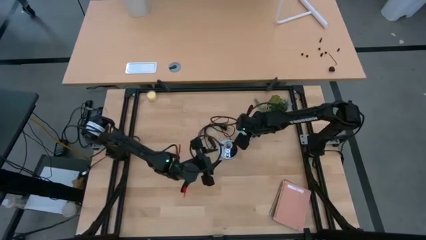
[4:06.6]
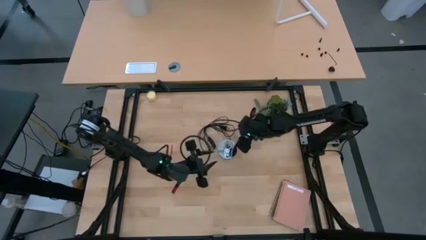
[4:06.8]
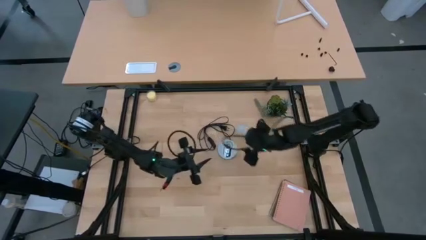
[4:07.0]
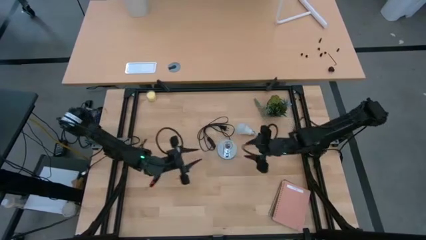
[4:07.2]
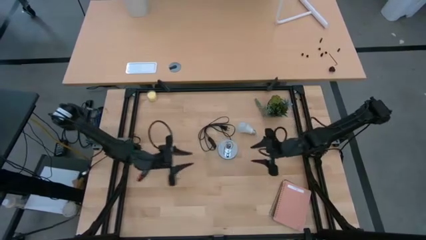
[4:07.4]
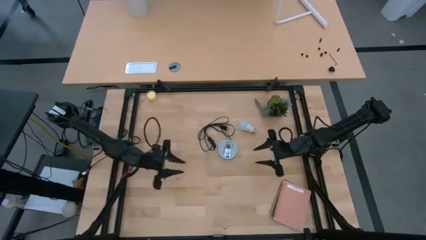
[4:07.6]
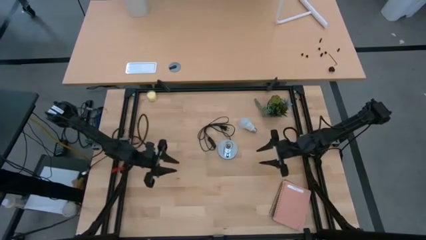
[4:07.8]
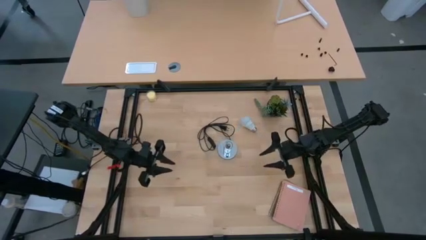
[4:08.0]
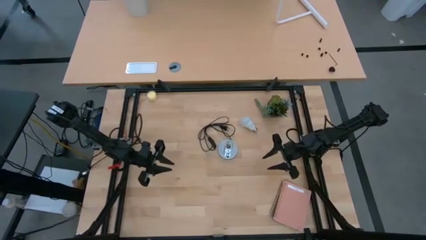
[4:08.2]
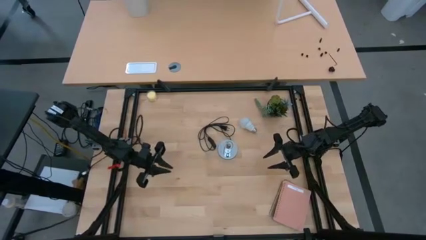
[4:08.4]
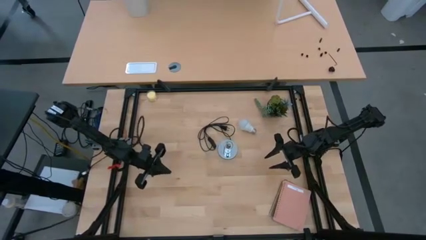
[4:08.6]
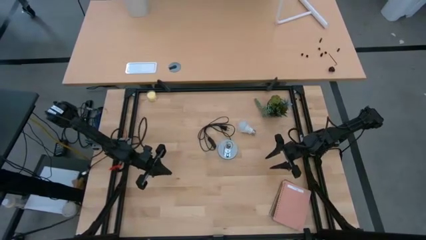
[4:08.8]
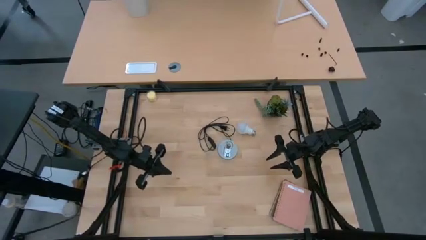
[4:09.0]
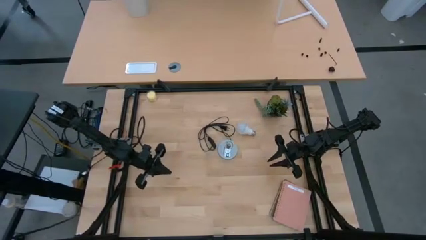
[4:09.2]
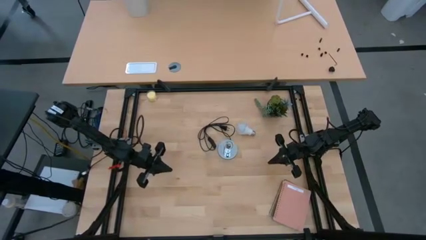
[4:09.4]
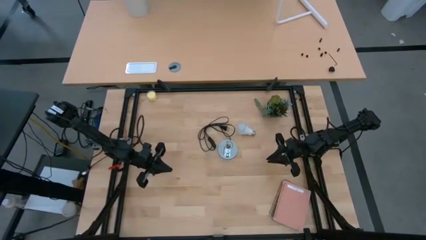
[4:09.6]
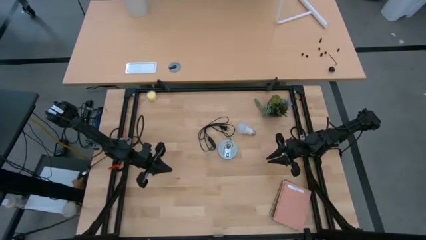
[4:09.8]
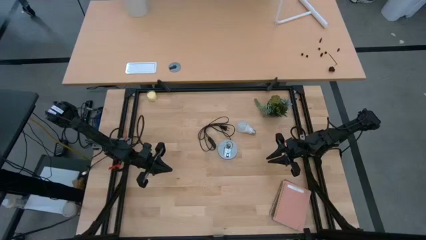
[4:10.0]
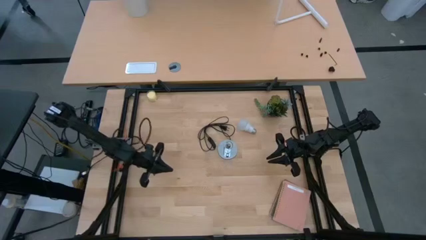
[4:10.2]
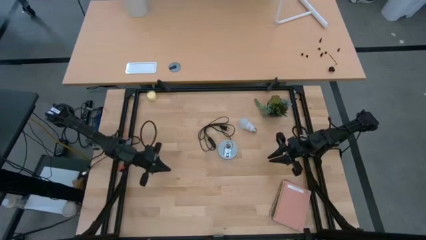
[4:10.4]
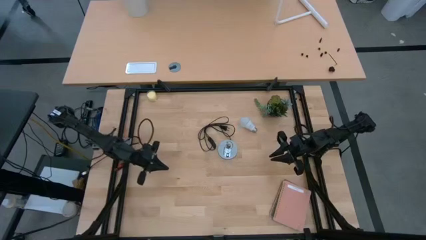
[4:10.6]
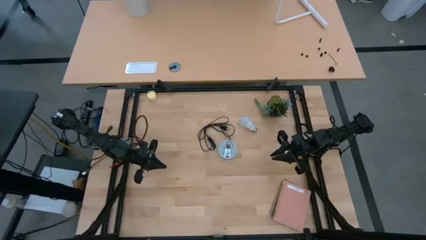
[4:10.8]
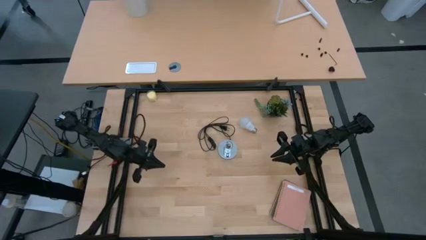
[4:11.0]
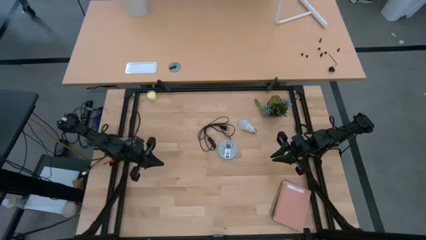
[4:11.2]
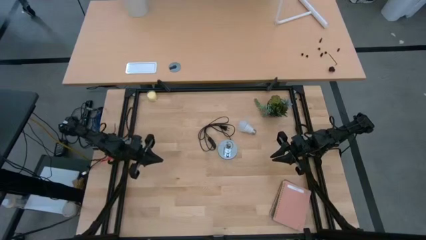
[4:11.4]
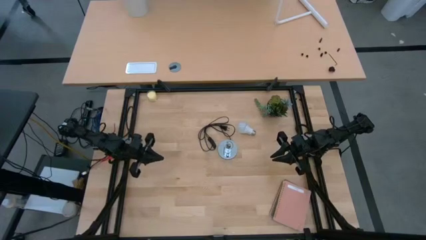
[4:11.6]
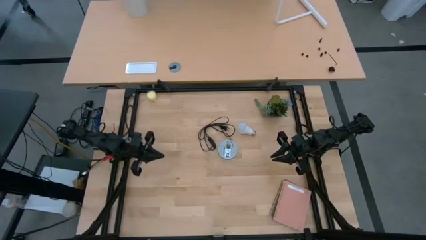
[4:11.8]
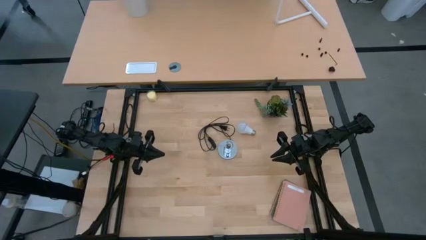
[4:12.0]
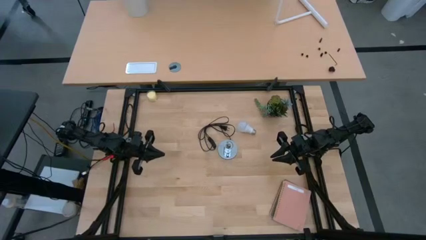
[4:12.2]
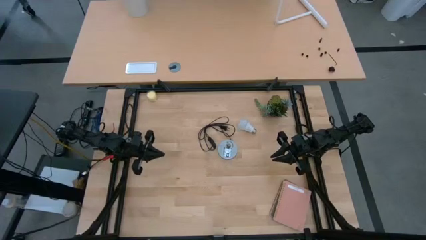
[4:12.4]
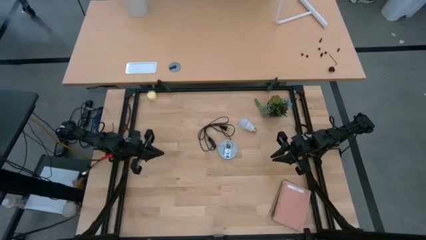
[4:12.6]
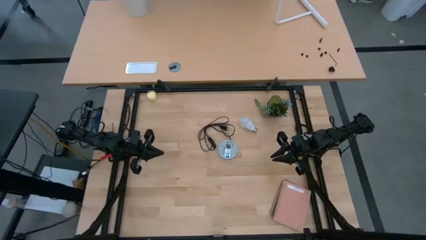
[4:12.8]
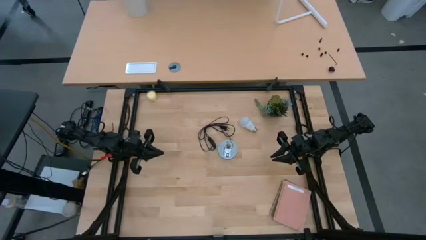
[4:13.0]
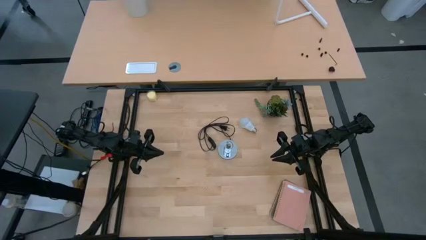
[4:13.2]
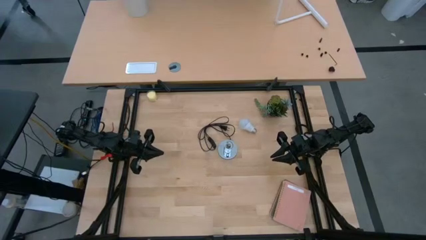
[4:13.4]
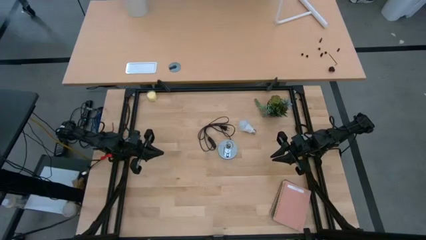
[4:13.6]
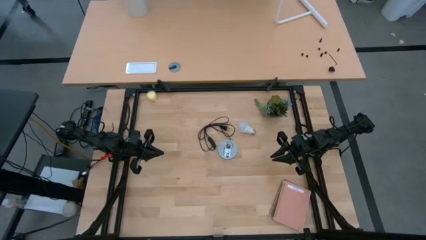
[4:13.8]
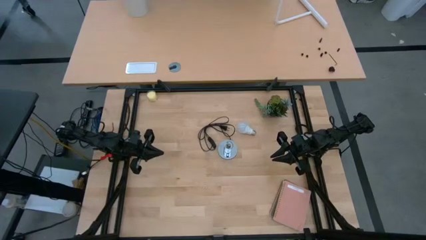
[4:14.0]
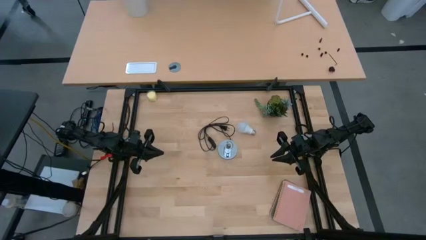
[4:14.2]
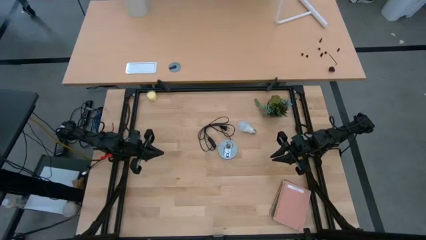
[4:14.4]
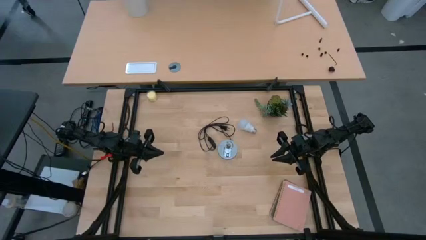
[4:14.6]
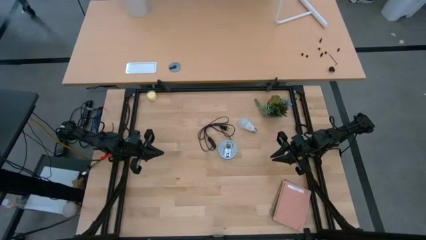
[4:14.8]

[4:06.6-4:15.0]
Task: Screw lightbulb
Return to Home Position
